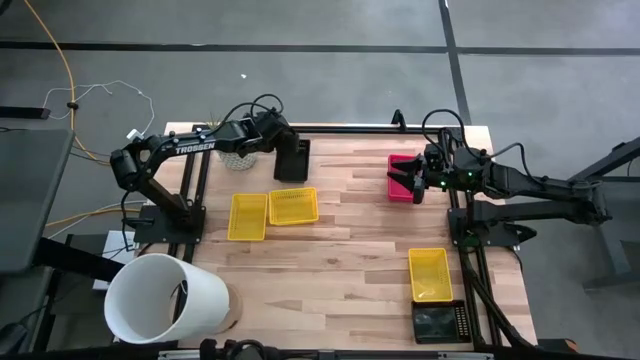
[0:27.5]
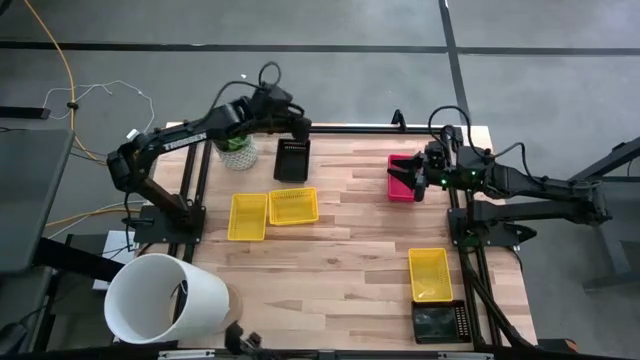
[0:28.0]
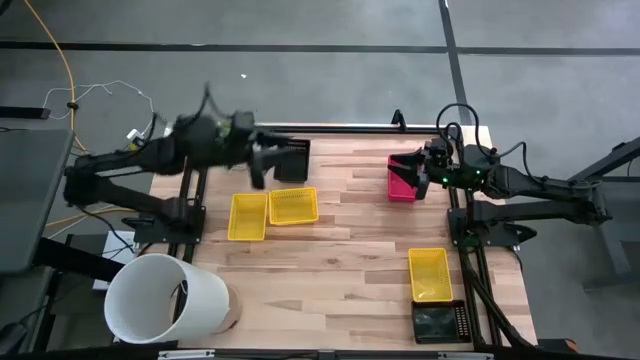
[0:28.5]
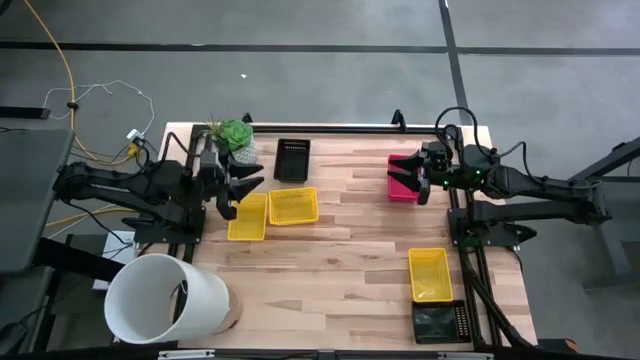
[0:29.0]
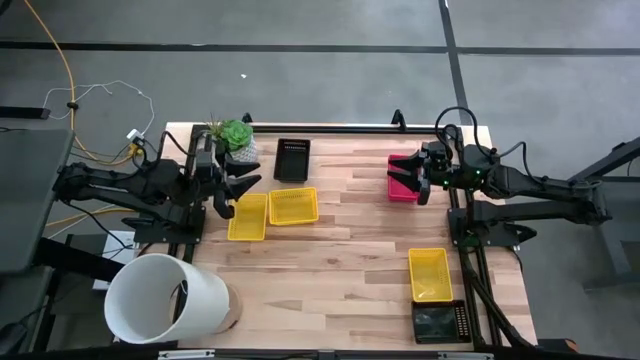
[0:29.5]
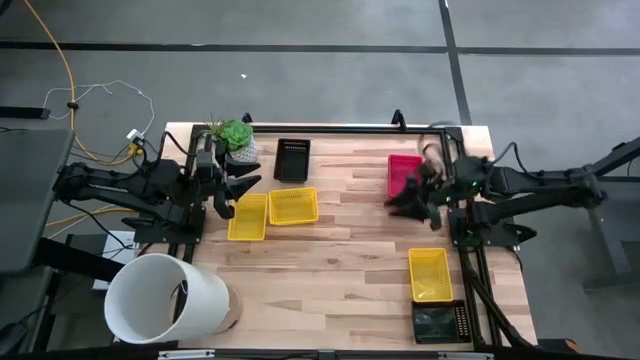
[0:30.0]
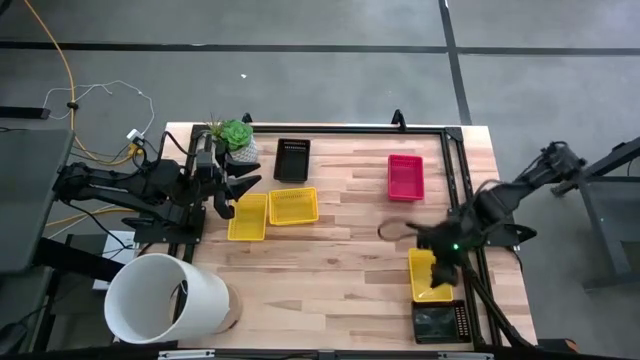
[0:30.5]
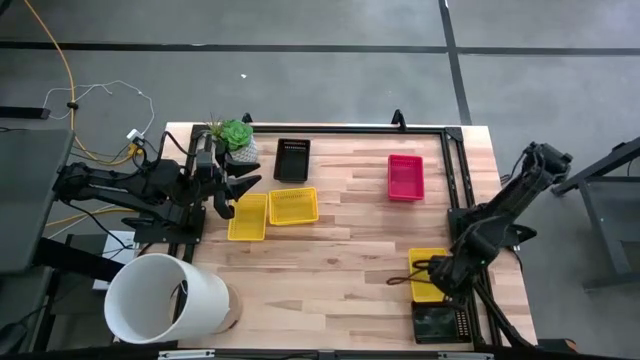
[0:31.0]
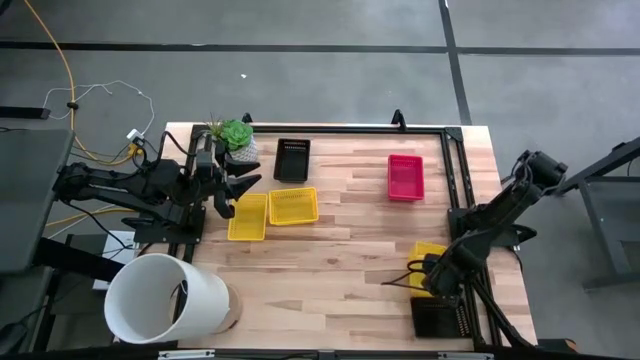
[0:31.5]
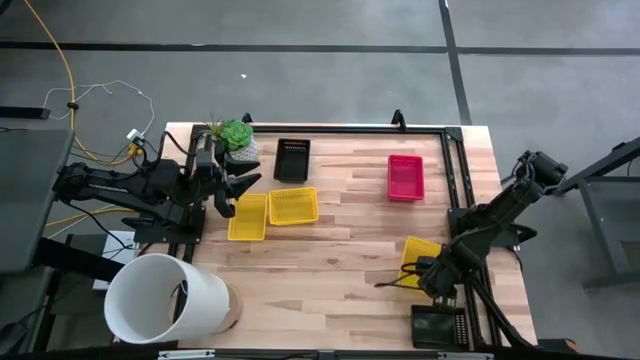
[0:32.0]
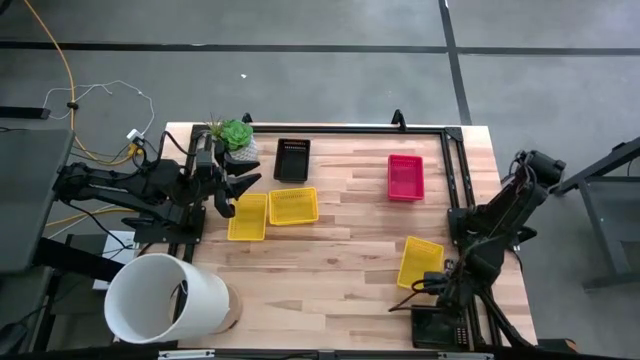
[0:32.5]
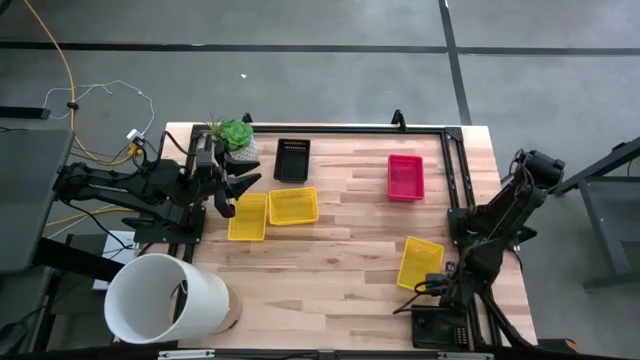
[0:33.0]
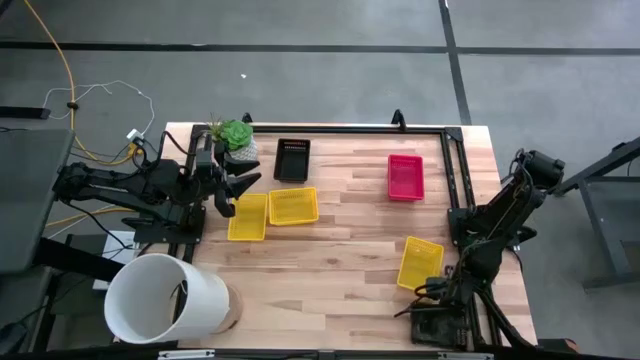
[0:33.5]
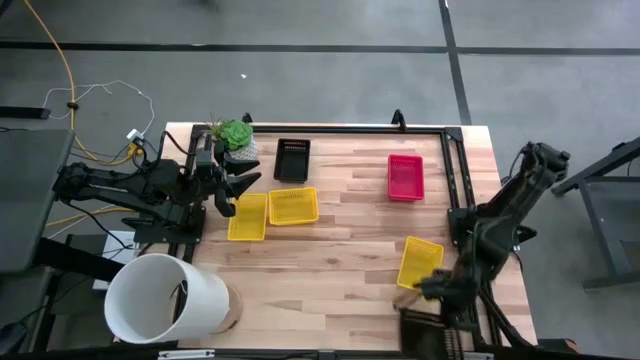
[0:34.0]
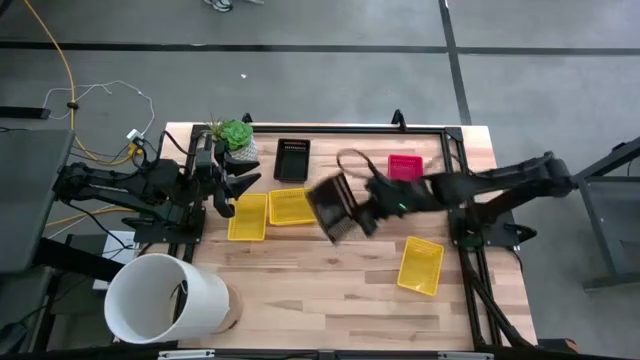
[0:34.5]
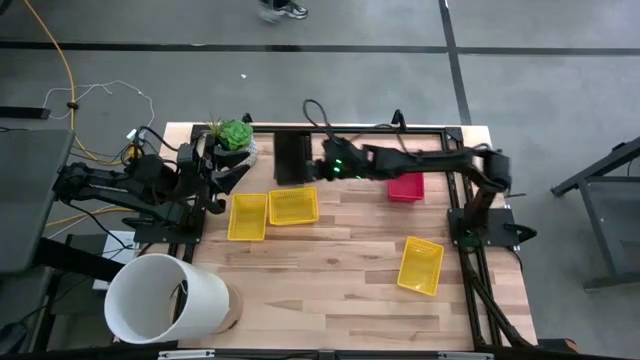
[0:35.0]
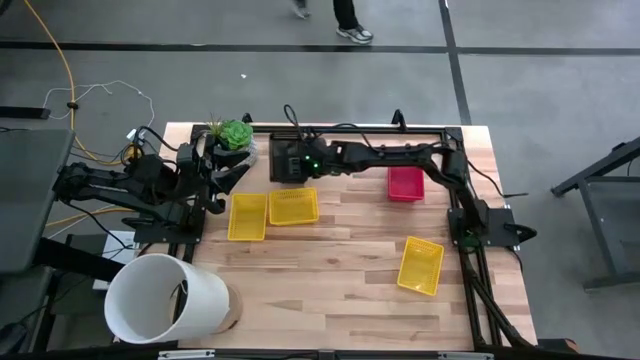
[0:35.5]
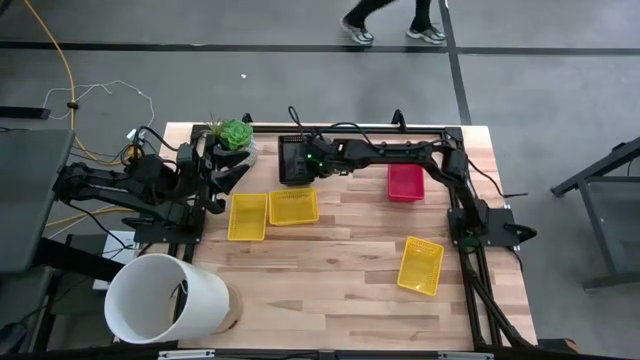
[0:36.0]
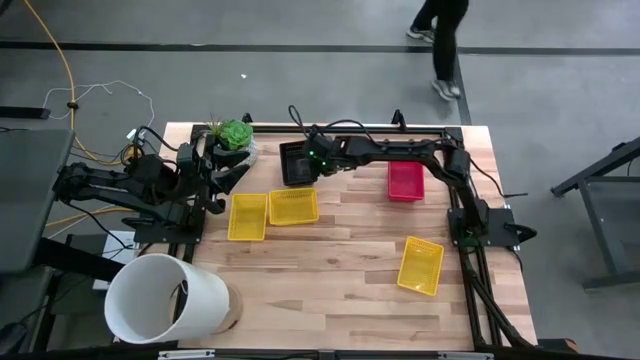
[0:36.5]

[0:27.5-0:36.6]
Stack the bottom black bin on top of the black bin

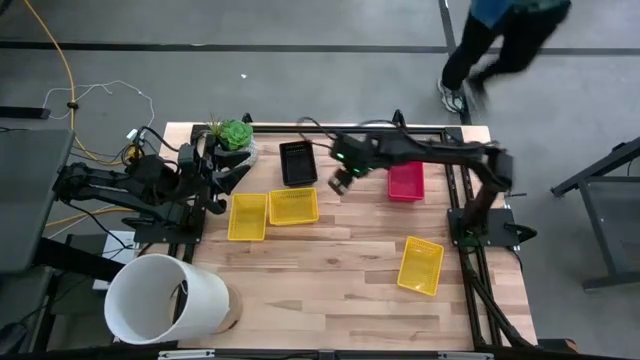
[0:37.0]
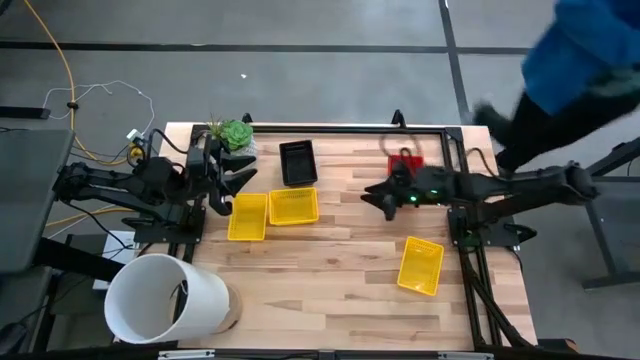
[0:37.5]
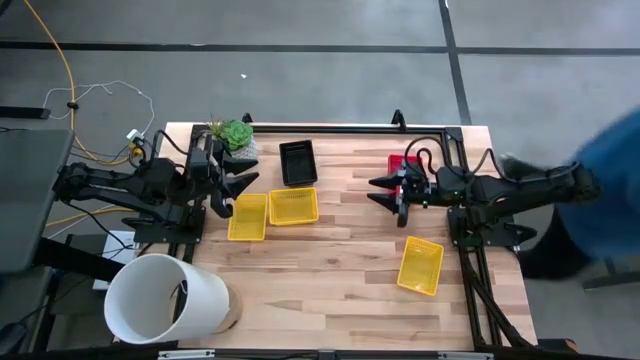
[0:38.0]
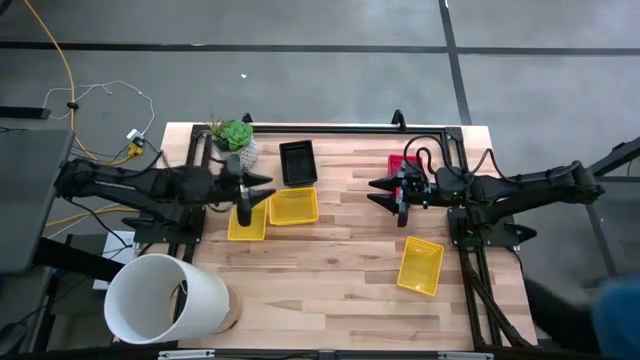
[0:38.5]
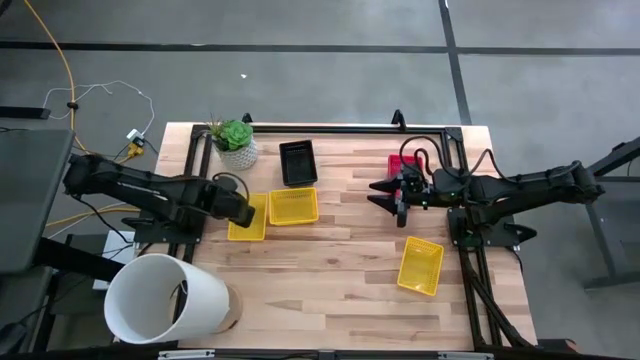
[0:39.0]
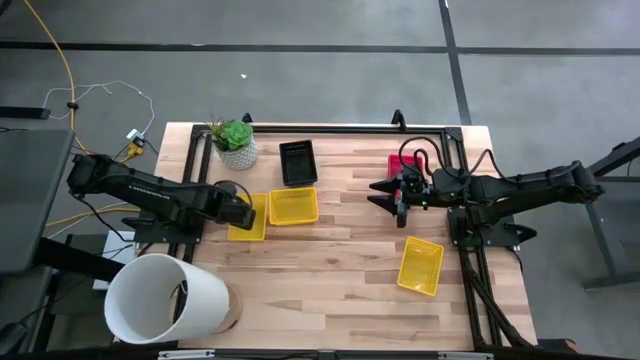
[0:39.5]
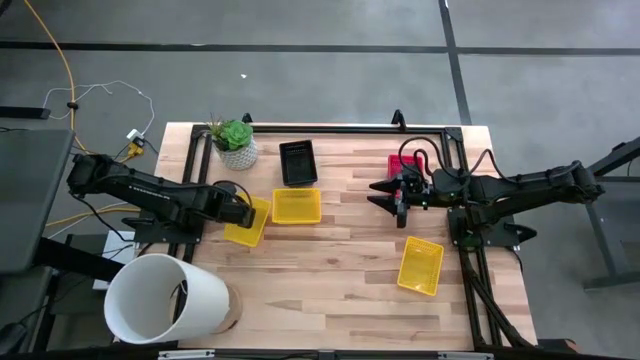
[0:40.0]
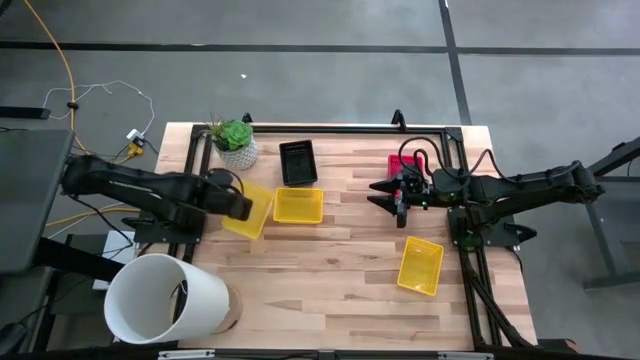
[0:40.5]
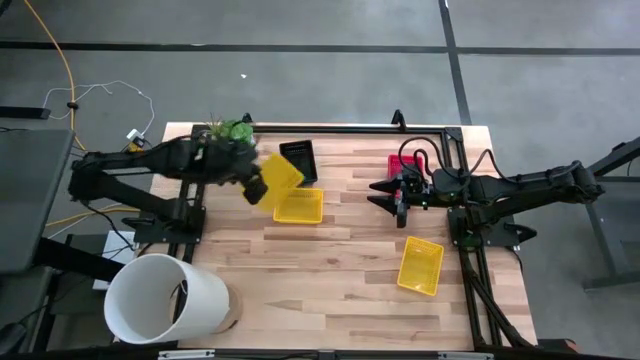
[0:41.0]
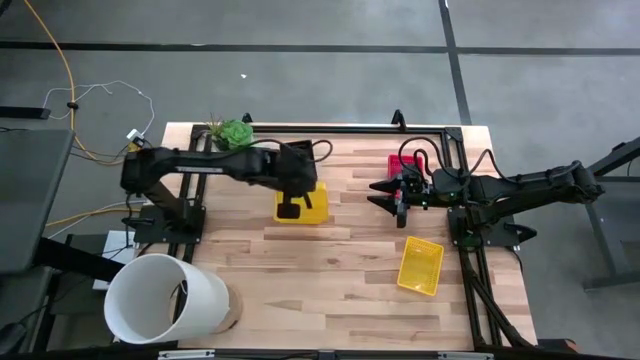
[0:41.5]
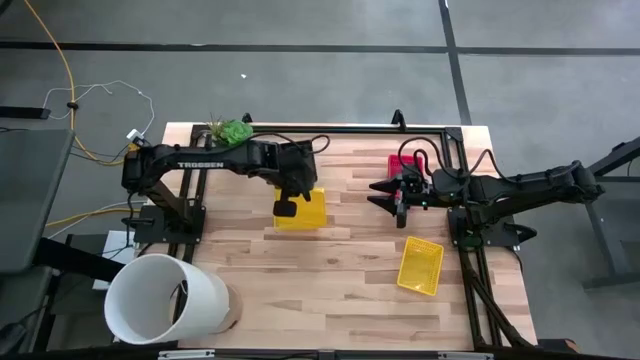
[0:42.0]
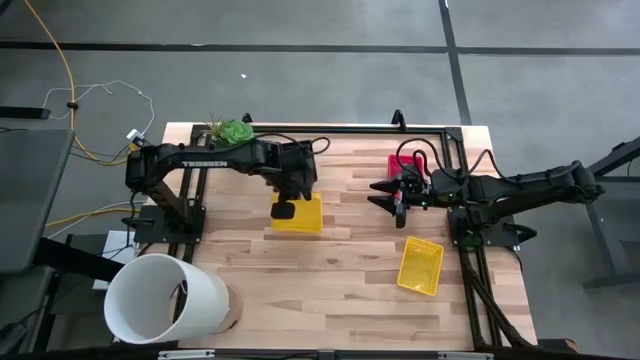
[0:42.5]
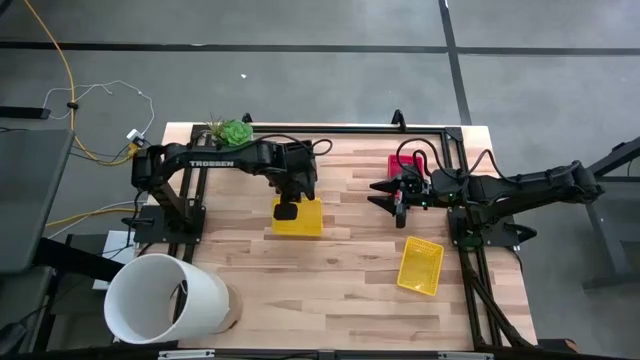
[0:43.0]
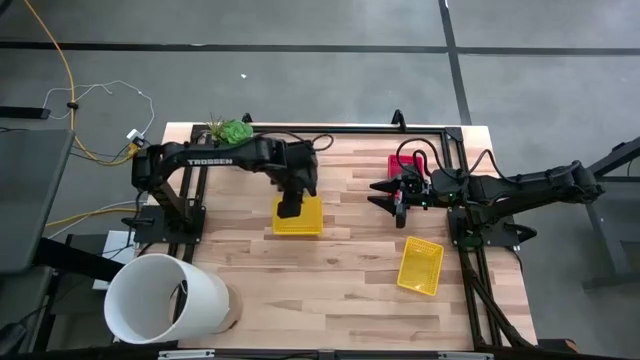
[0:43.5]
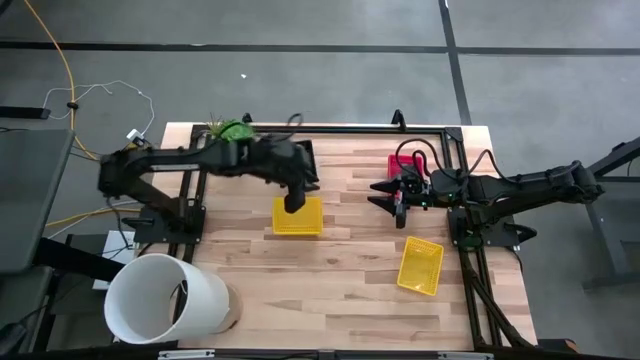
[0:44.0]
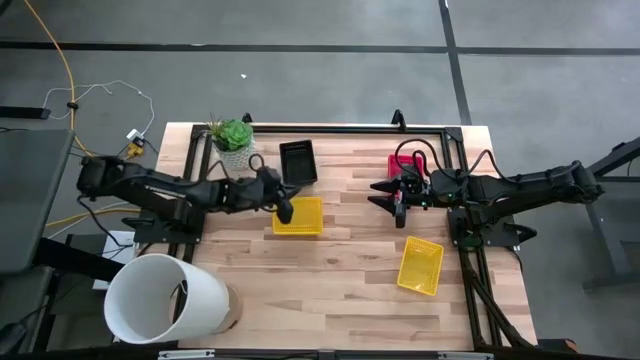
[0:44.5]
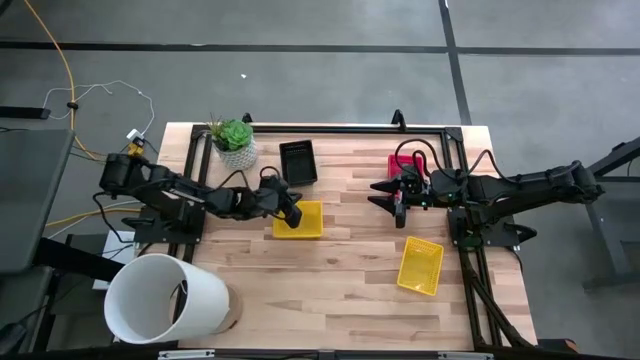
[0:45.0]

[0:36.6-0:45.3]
Stack the top yellow bin on top of the yellow bin

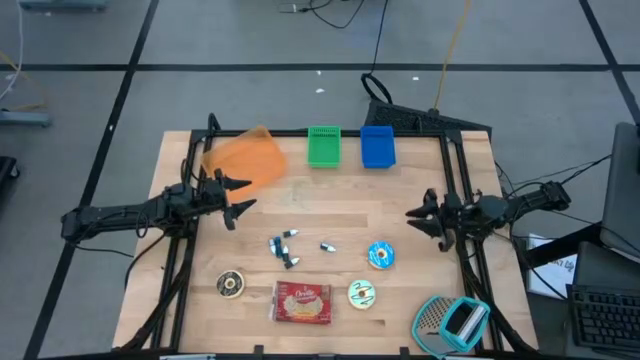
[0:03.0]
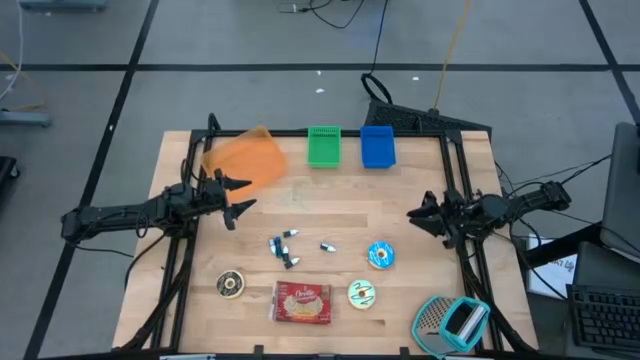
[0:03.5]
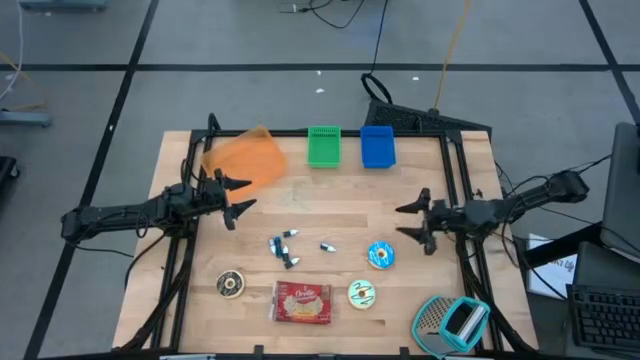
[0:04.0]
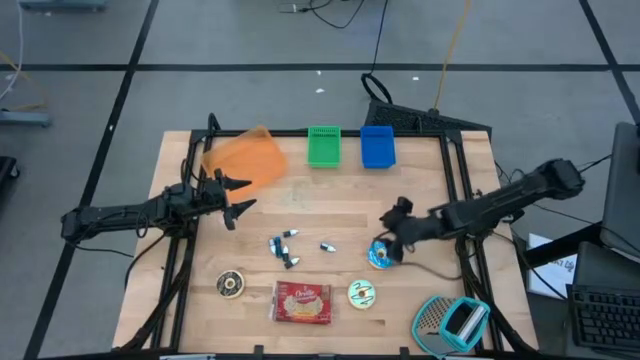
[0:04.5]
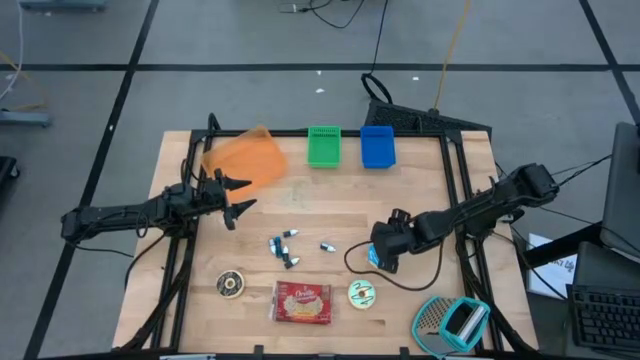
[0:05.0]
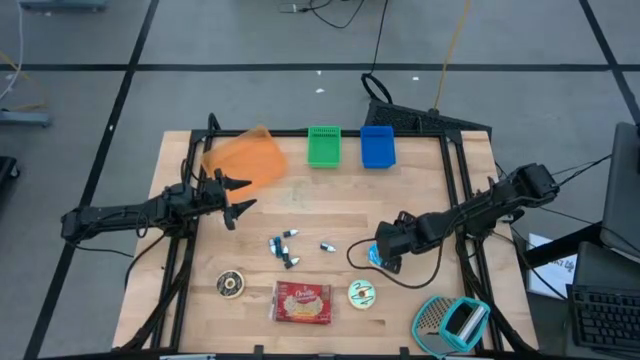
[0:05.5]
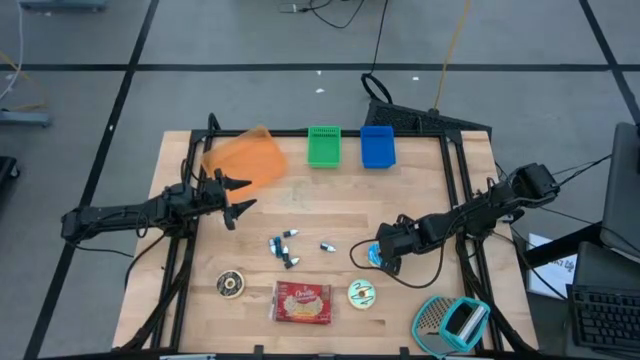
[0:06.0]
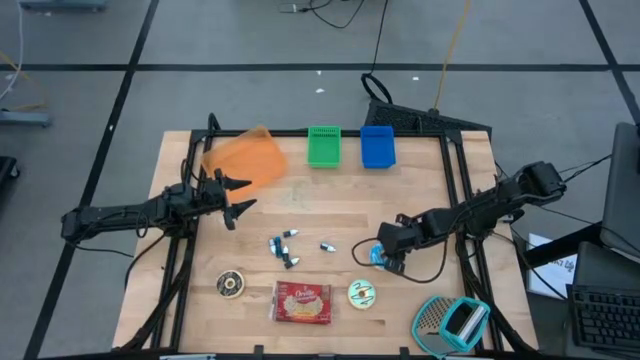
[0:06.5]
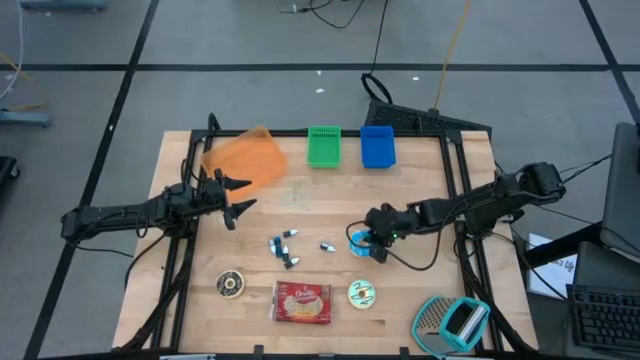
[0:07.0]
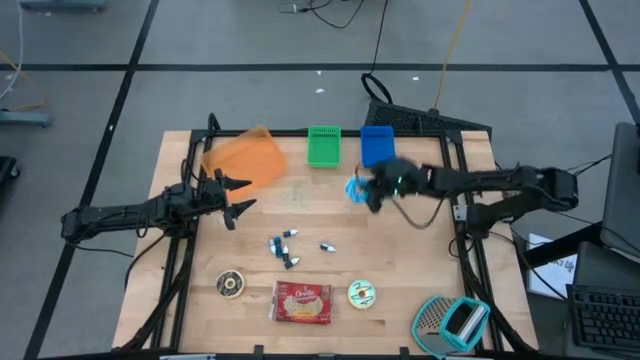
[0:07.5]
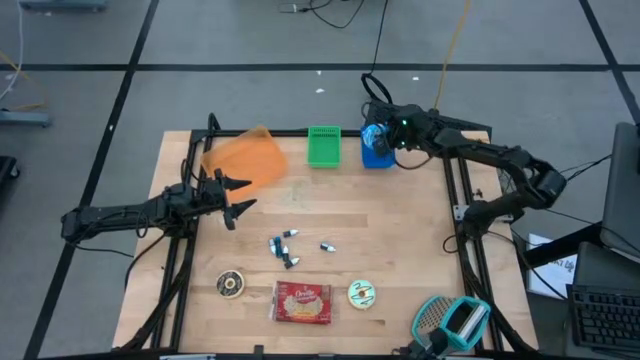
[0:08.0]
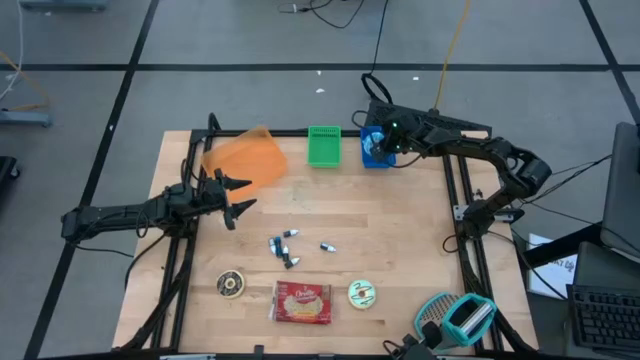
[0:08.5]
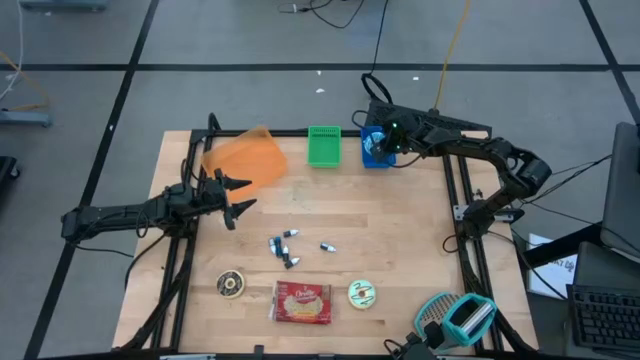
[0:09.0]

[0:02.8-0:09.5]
Put the blue doughnut into the blue bin
